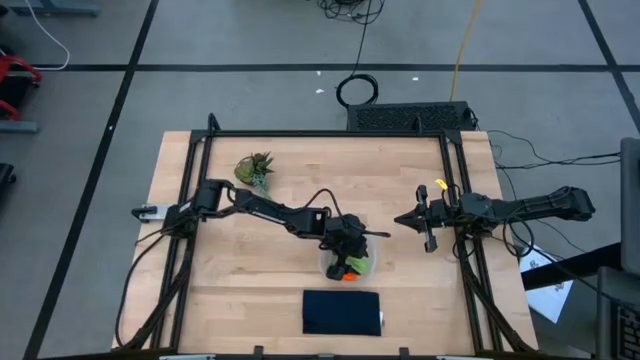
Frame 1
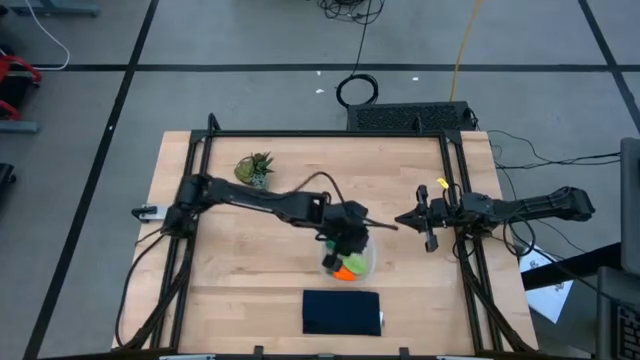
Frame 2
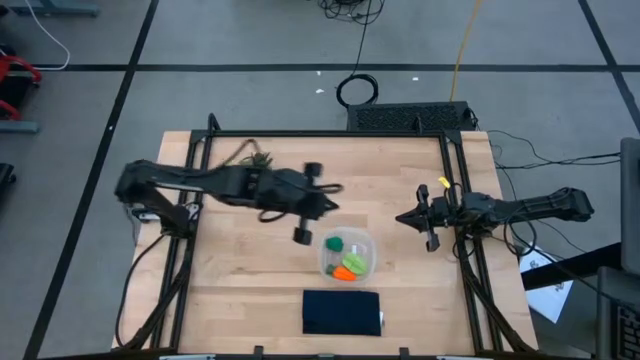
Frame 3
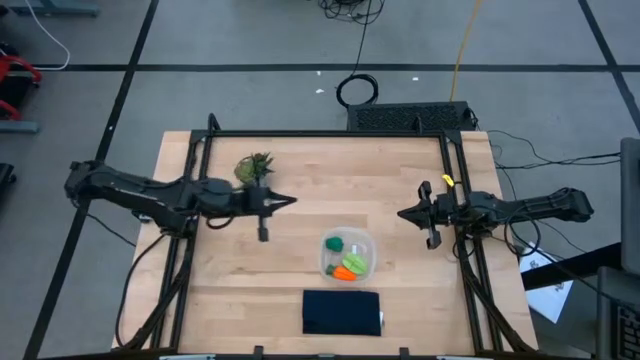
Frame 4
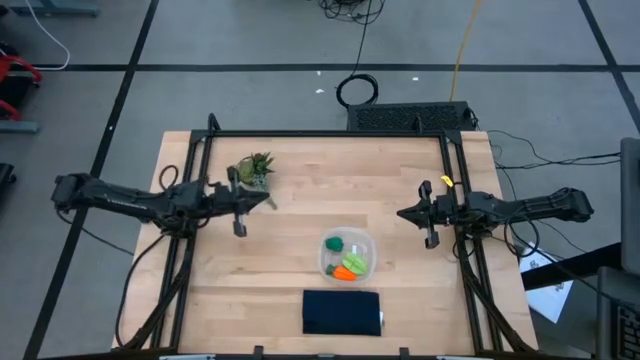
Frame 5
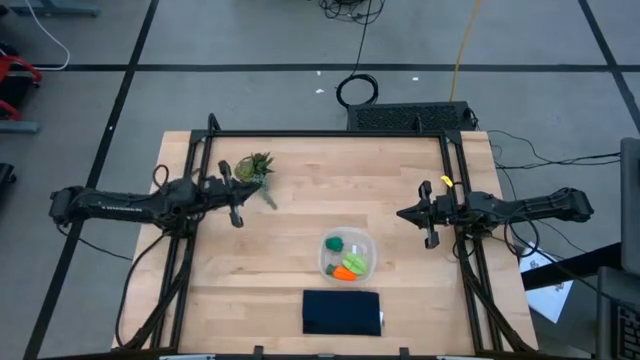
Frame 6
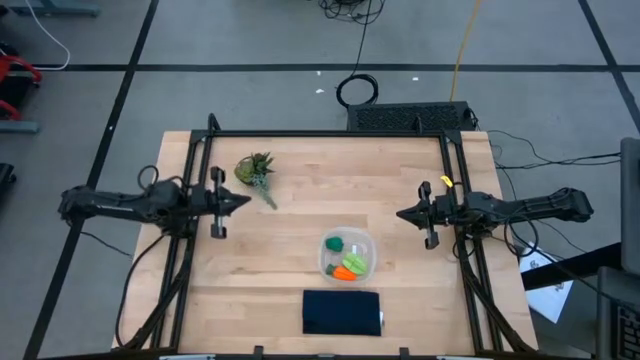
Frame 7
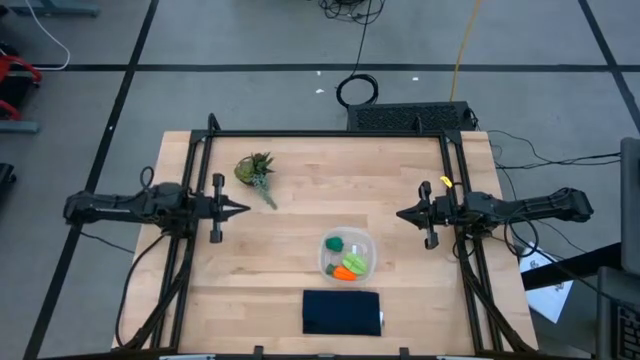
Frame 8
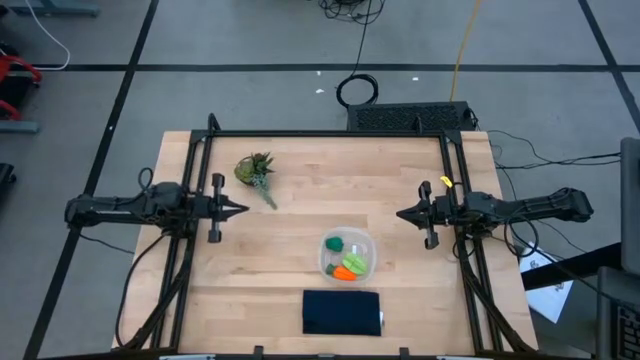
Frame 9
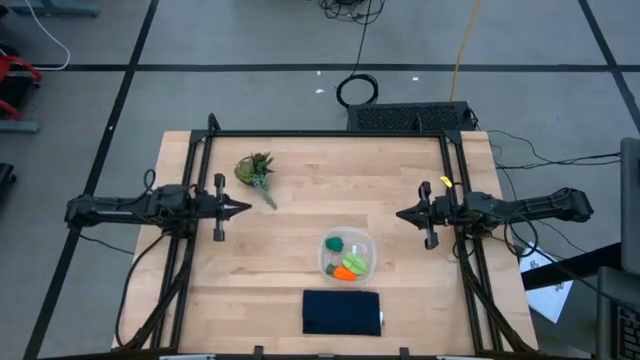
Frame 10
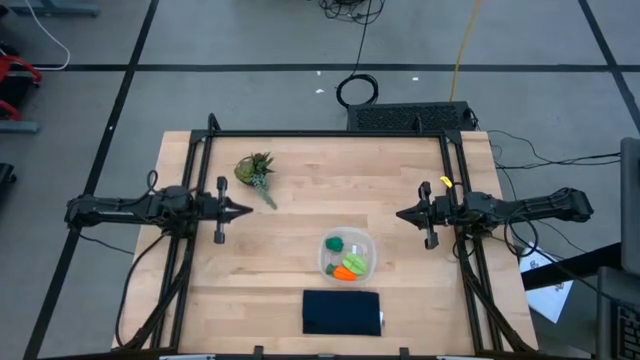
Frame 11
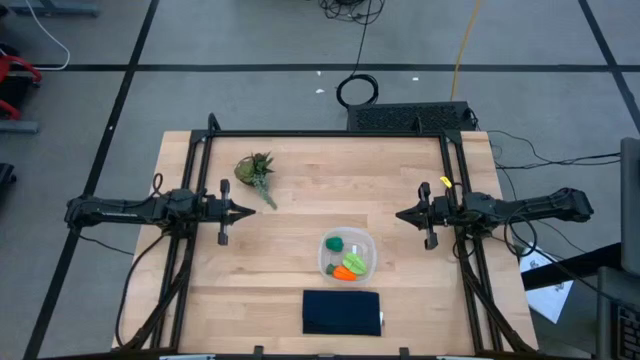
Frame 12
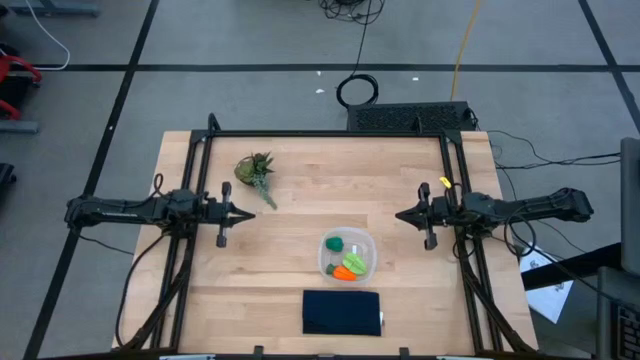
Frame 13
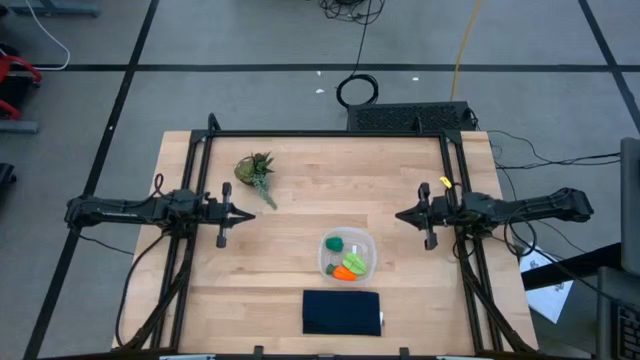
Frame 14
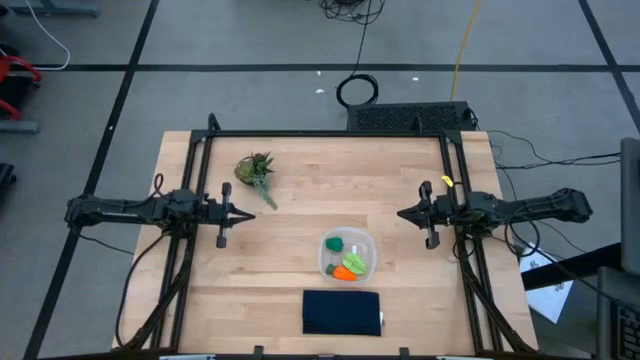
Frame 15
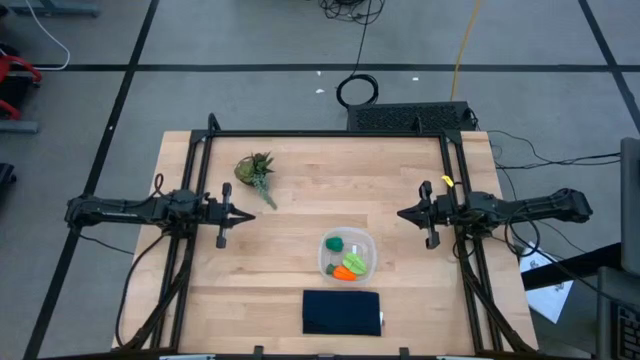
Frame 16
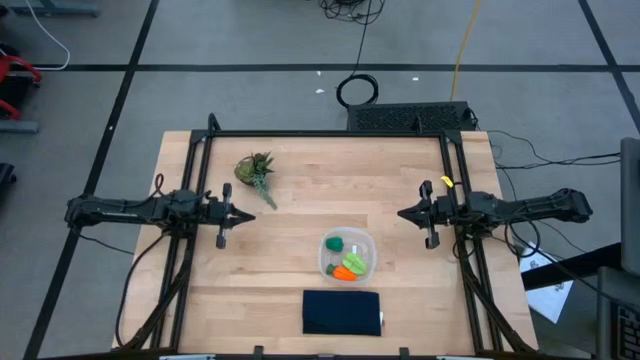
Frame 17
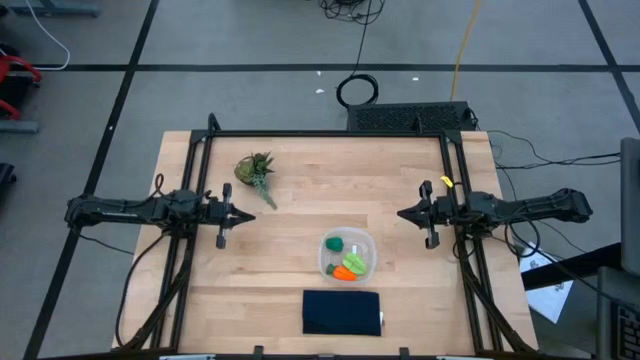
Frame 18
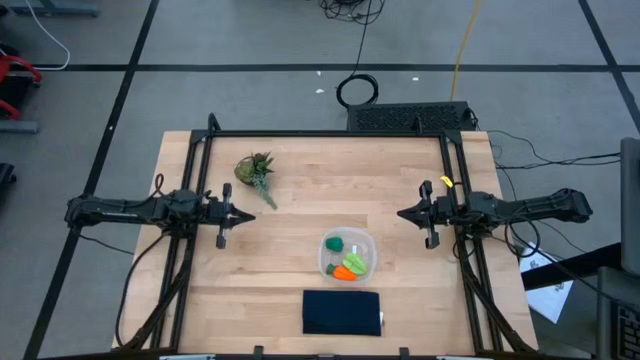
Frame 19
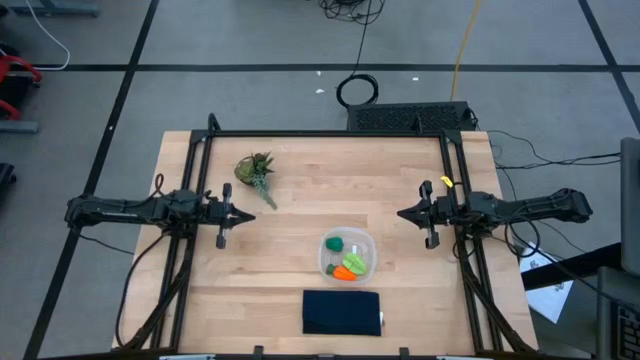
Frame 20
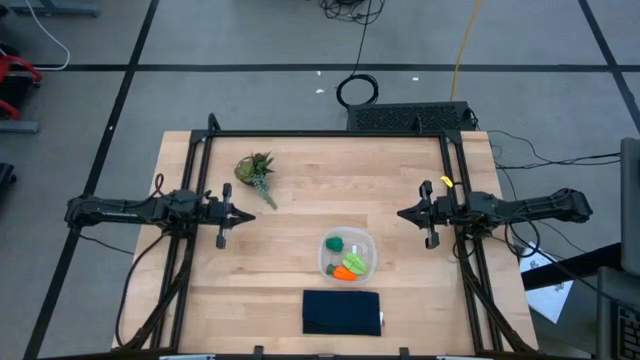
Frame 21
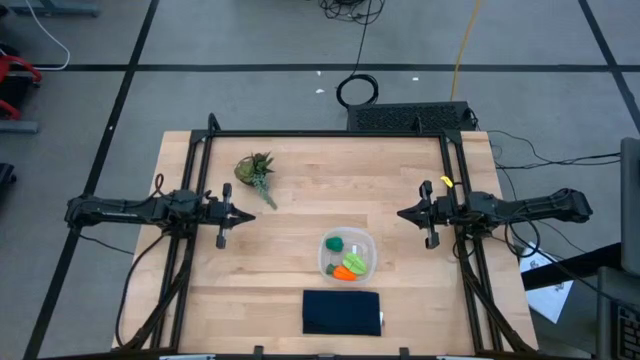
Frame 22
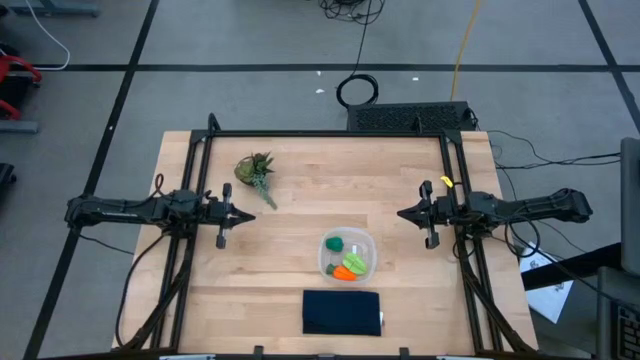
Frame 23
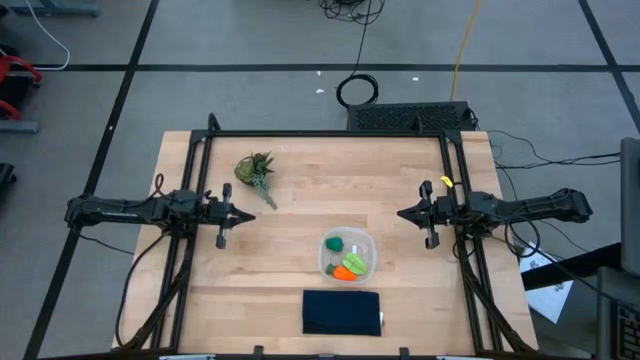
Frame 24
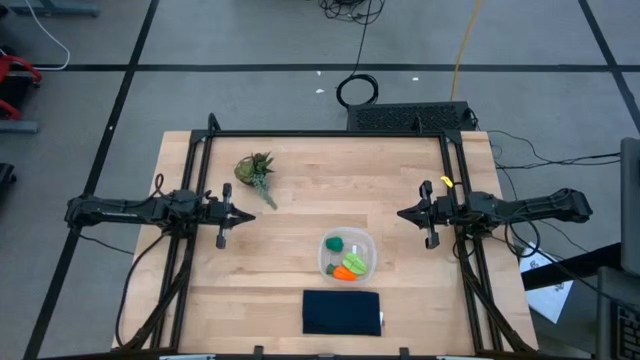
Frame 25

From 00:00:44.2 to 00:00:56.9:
Task: Pick and placing Produce into tupperware
Return to Home Position

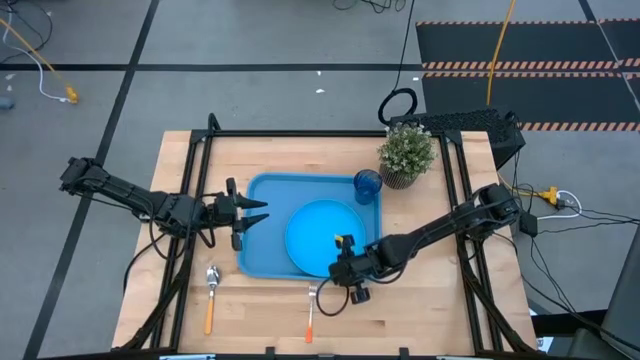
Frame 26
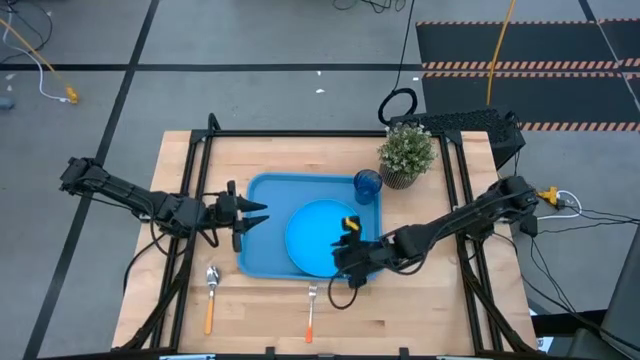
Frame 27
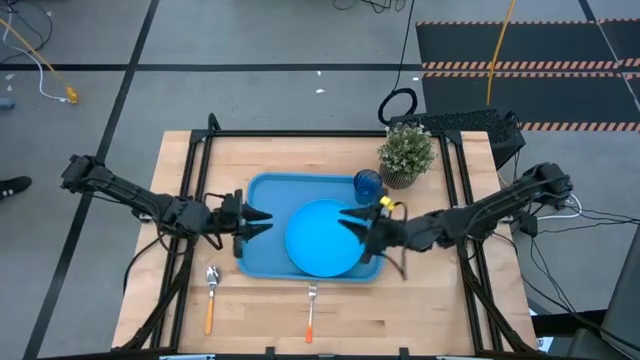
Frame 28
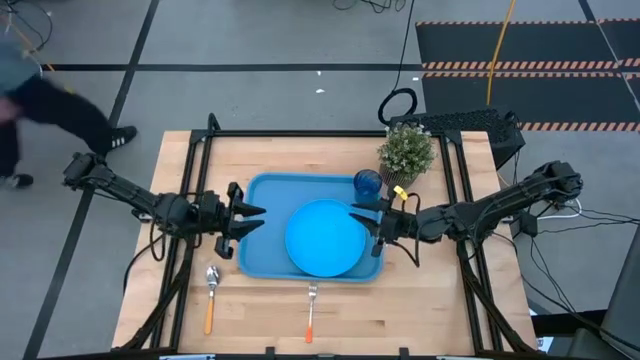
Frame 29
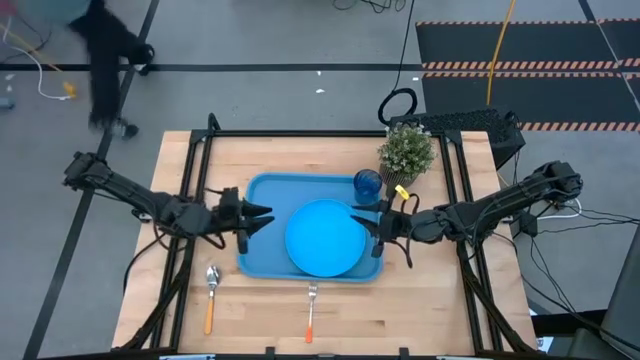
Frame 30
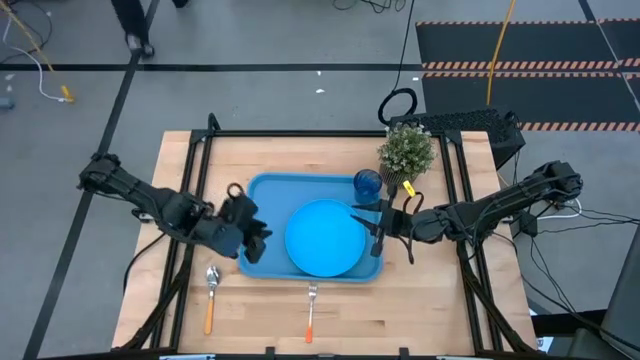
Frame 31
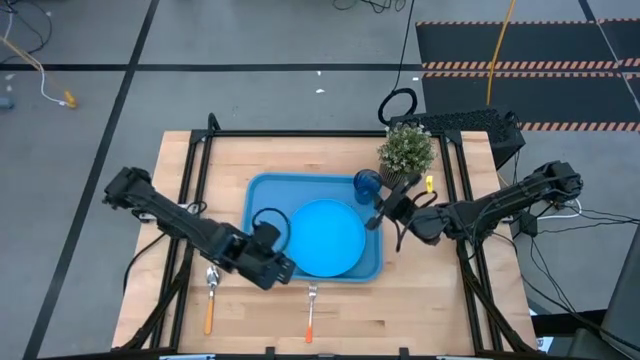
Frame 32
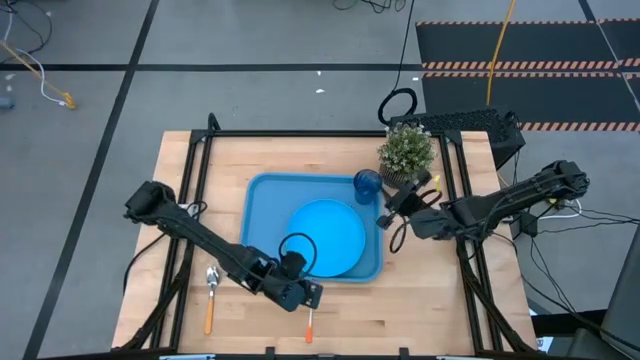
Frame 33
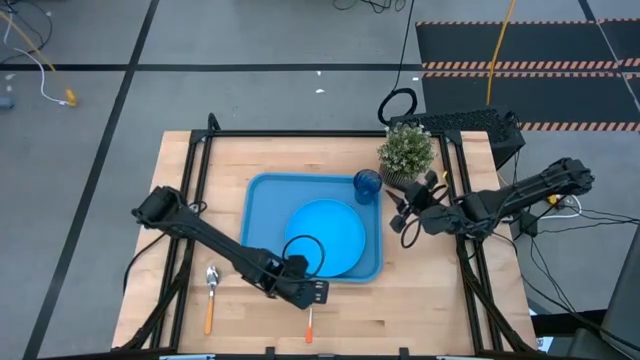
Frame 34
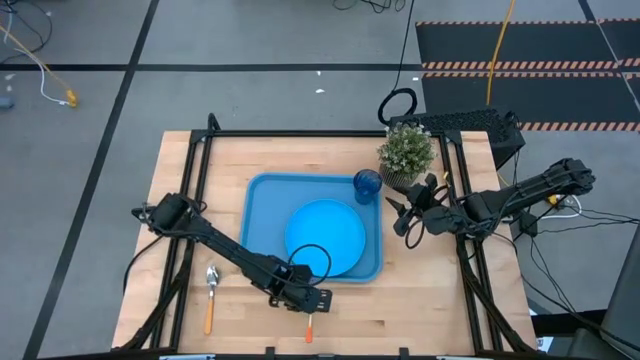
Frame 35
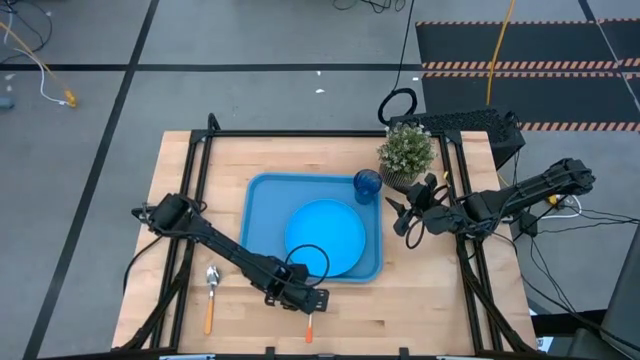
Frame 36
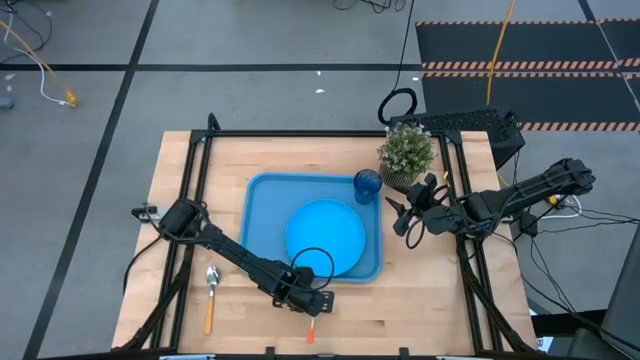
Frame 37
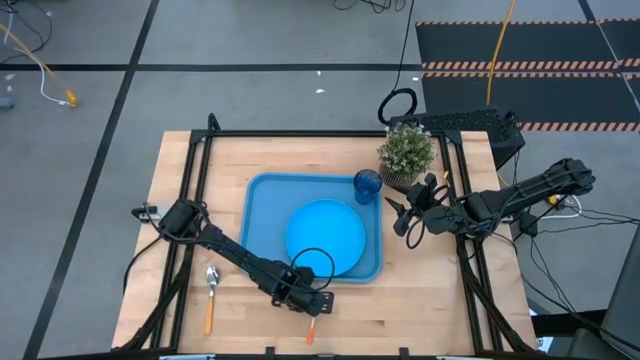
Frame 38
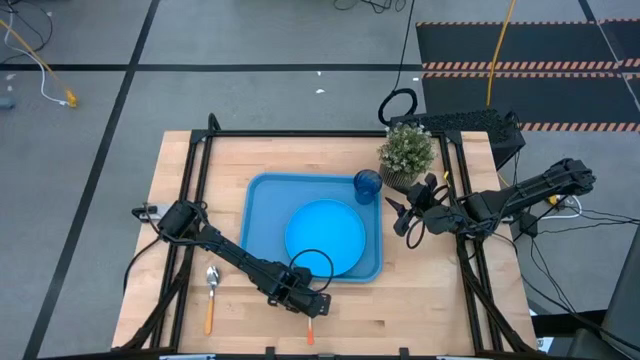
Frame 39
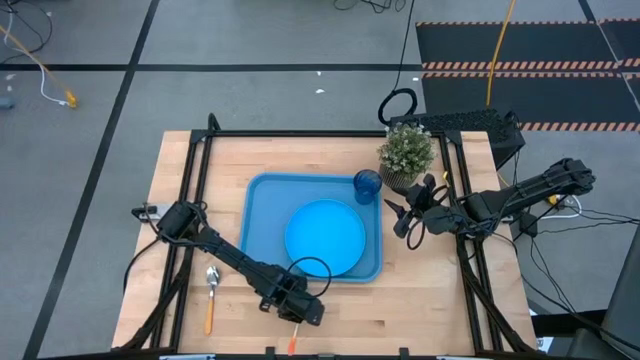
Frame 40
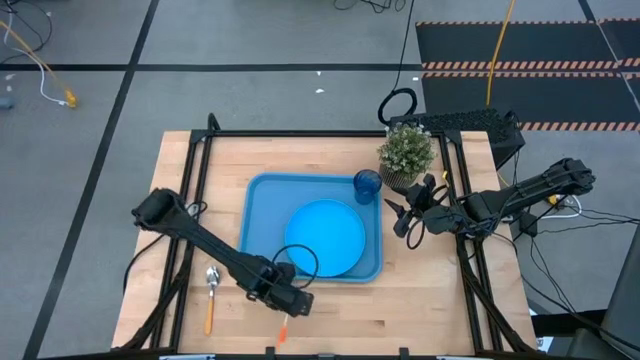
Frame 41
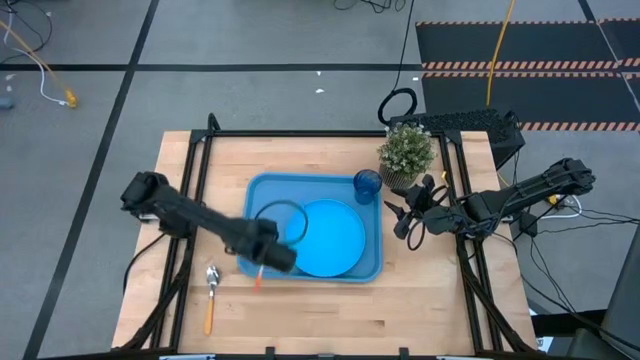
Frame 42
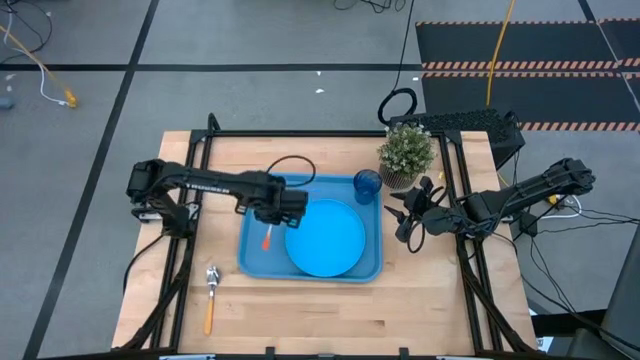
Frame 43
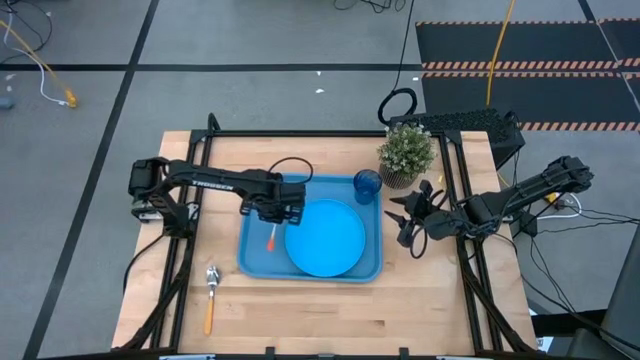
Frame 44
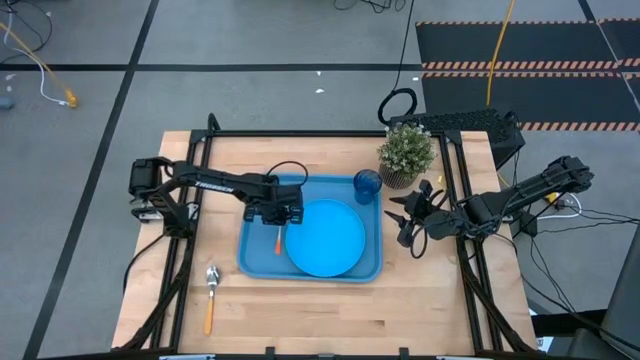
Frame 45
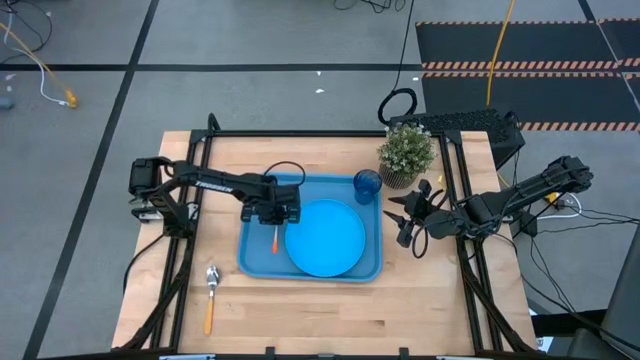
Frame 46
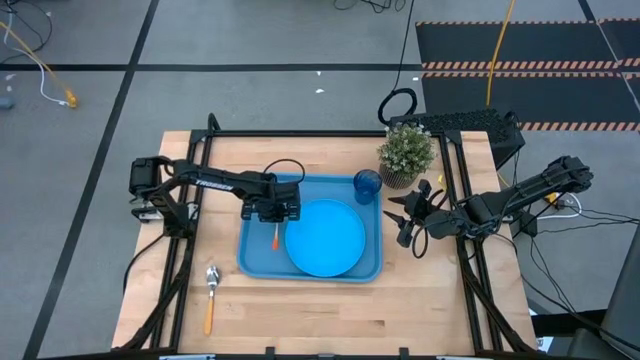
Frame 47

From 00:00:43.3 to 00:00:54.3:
Task: Pick and place plate/cup/fork/spoon on tray
Put the orange fork on the blue tray to the left of the blue plate
